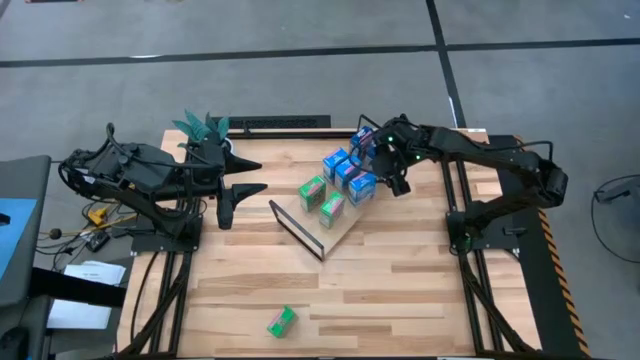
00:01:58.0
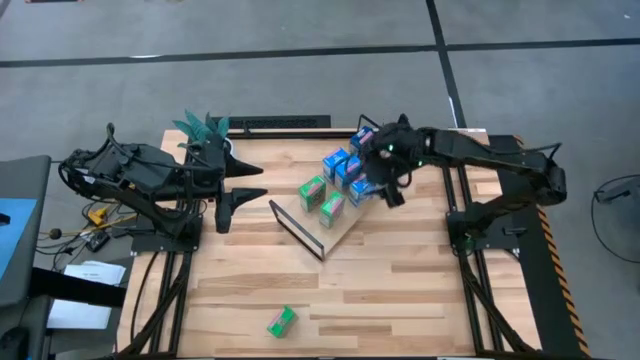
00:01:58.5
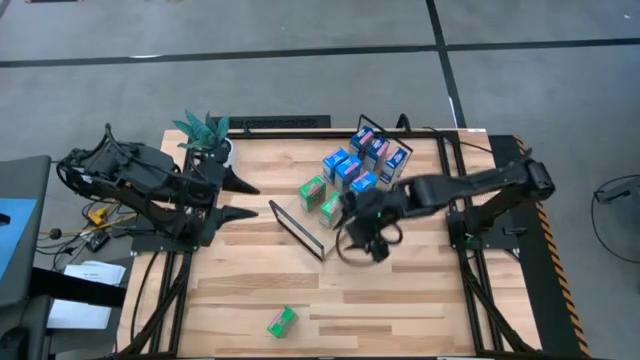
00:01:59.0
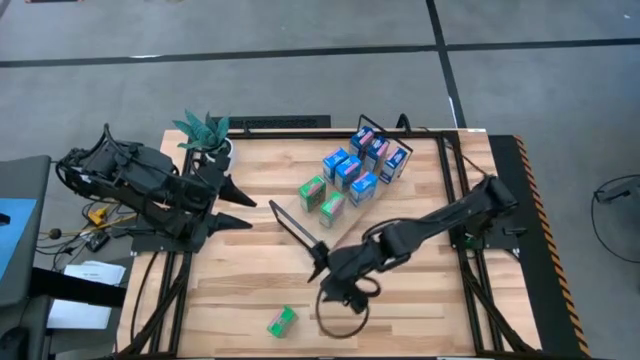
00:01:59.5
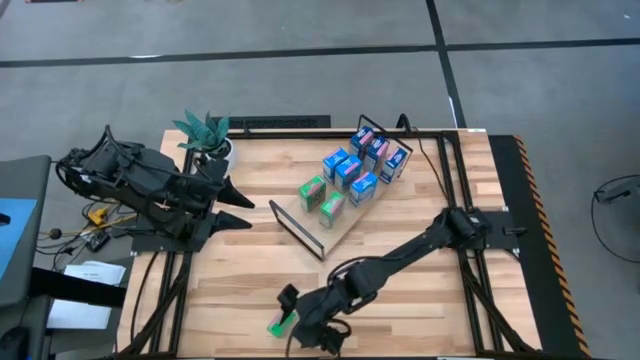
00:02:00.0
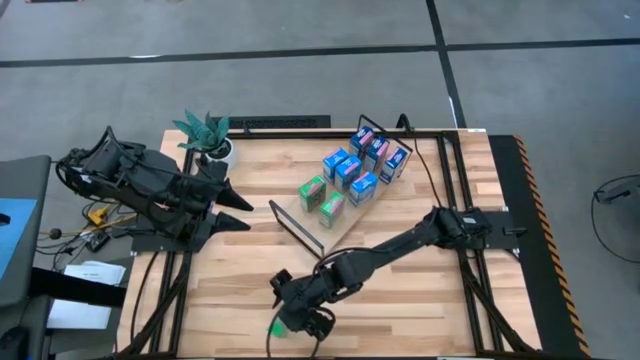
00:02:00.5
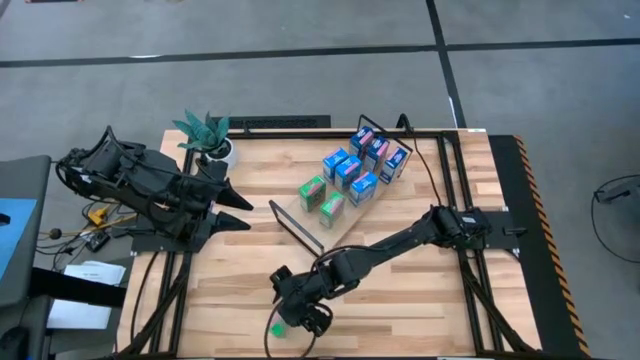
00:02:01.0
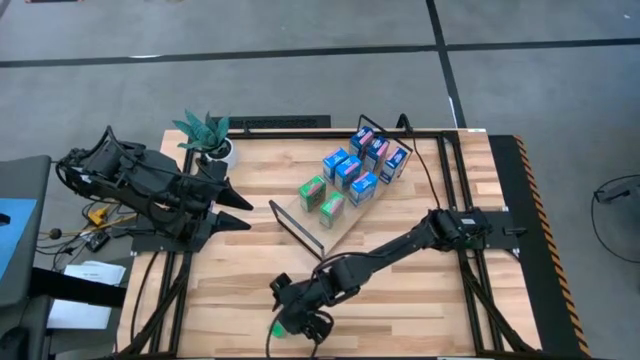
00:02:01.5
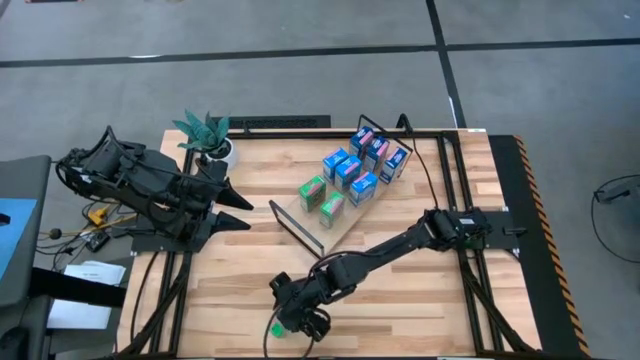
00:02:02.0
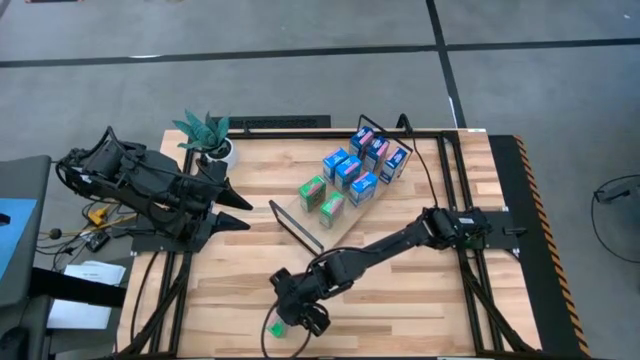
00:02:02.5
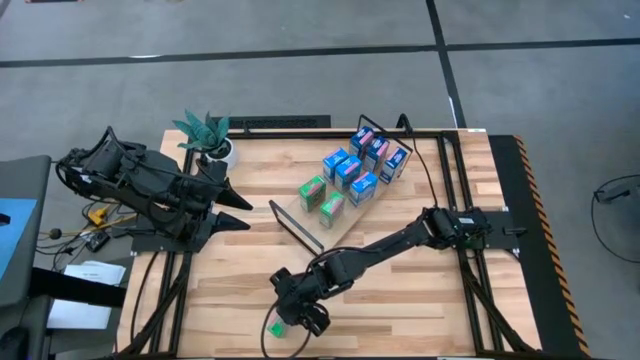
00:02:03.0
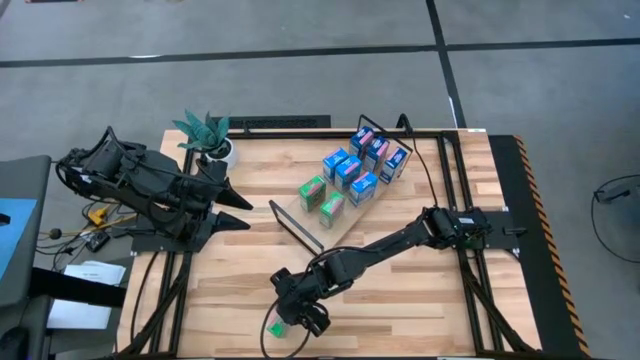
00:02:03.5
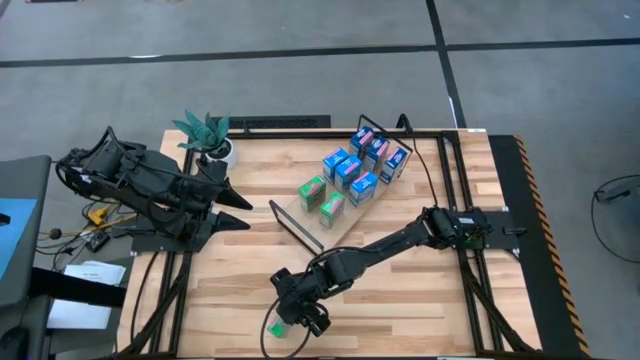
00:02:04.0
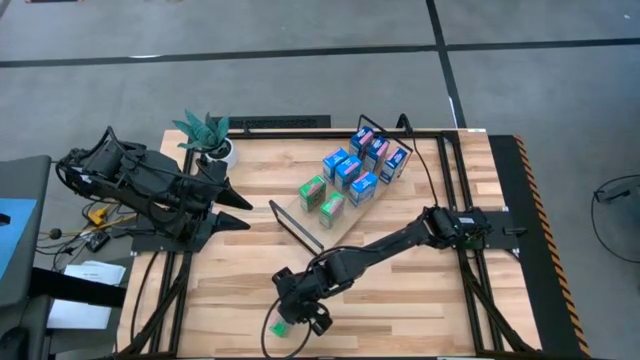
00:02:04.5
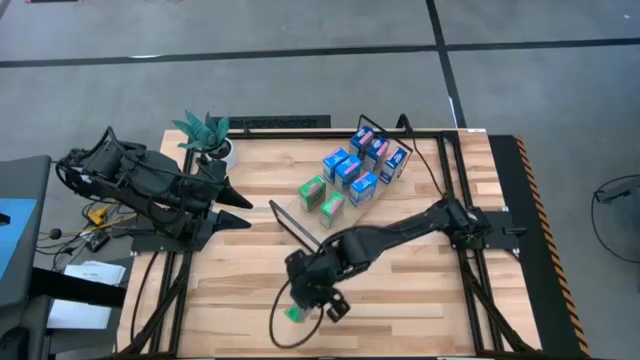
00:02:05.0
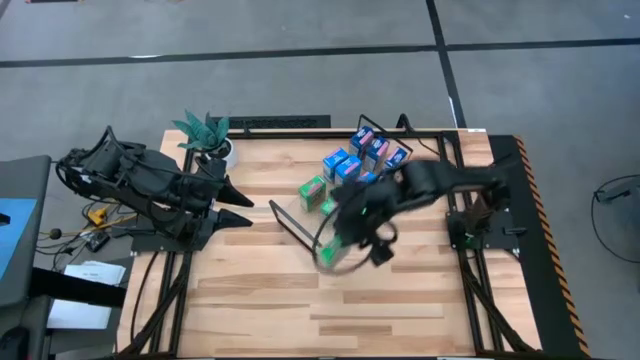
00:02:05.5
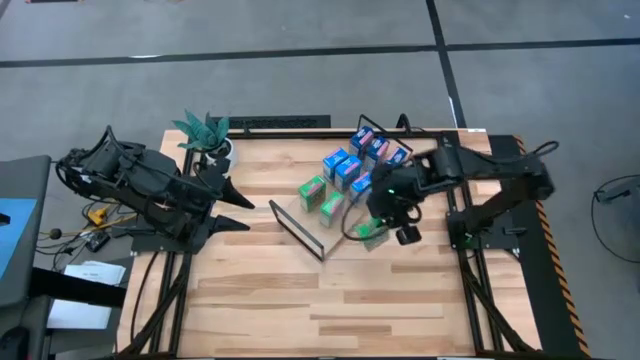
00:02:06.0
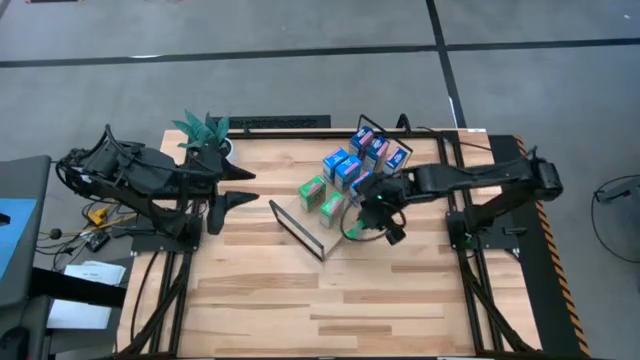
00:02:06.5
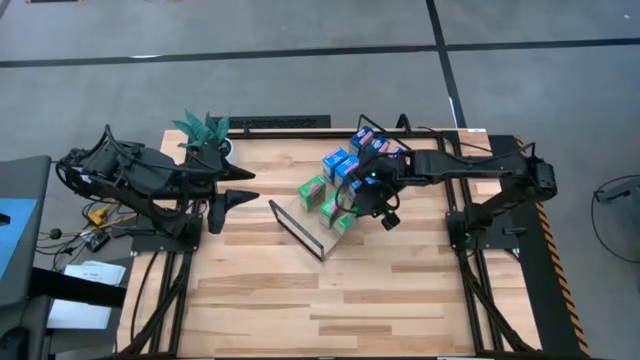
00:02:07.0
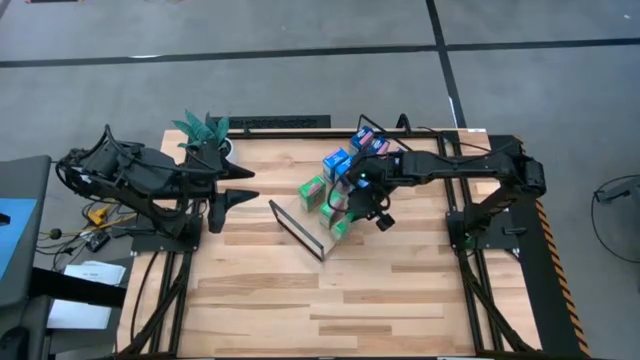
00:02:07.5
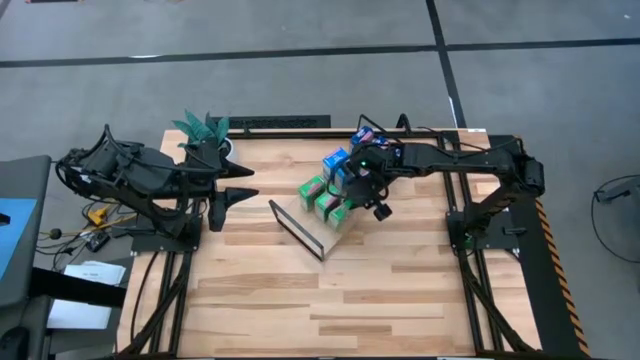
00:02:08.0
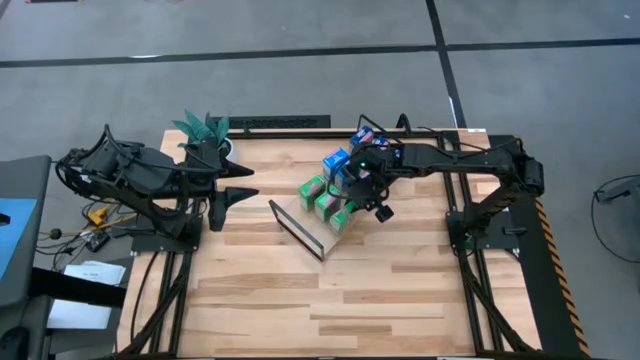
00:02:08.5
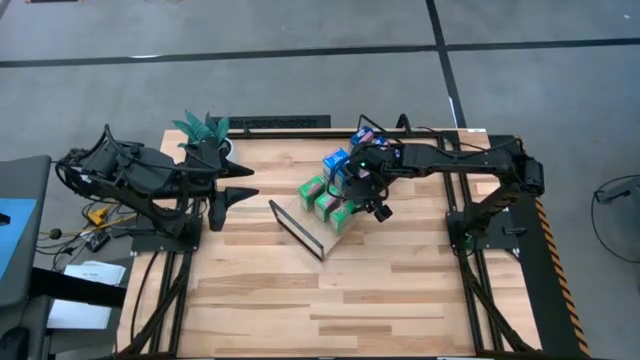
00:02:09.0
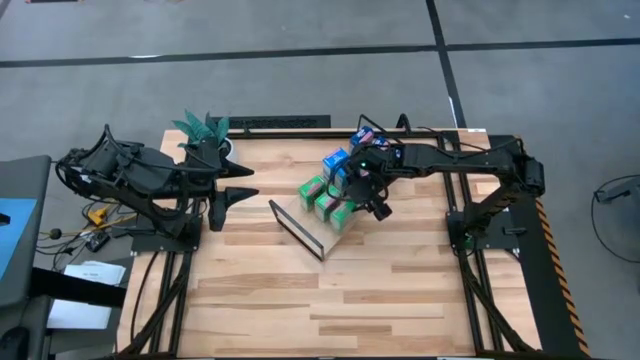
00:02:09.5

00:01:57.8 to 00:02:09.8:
Task: Stack cereal on shelf
Put the green cereal box on the shelf aligned with the green cereal boxes

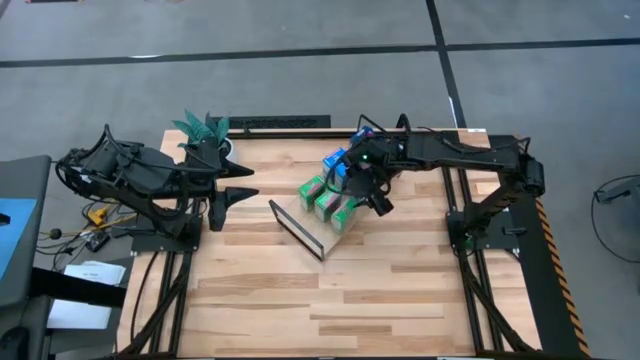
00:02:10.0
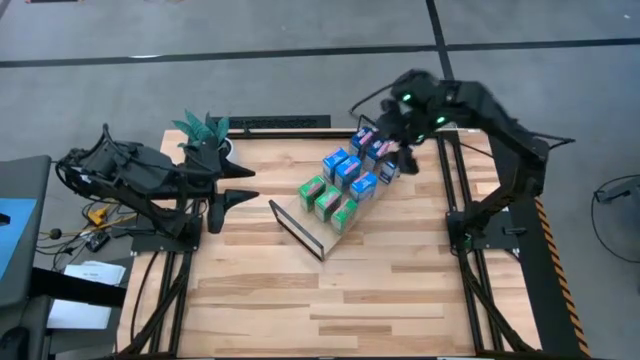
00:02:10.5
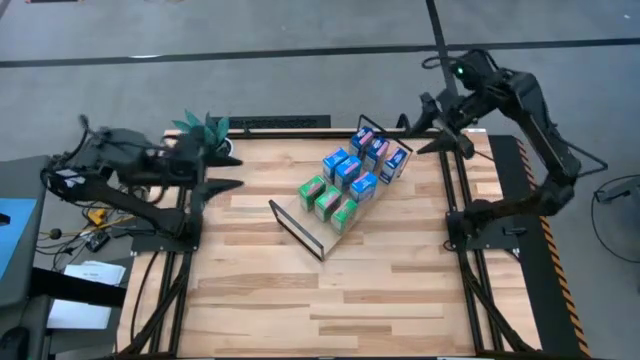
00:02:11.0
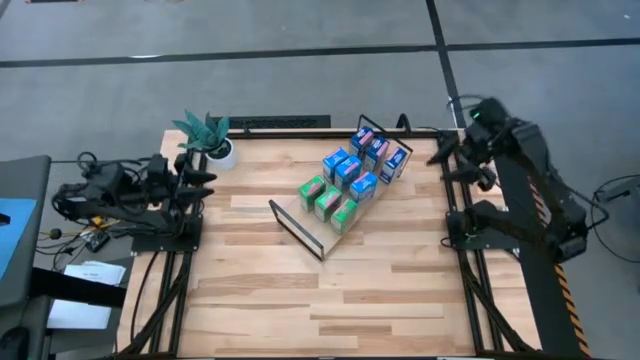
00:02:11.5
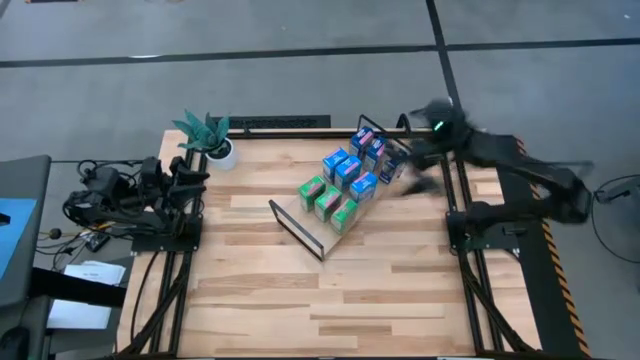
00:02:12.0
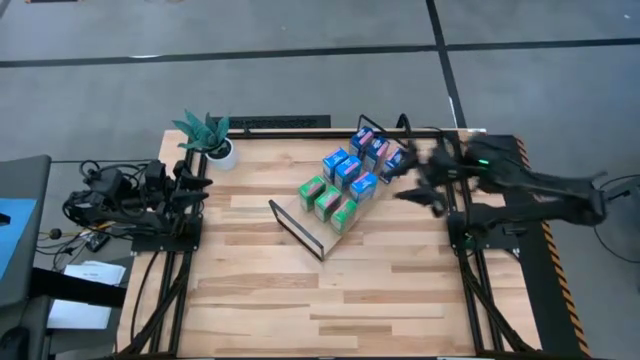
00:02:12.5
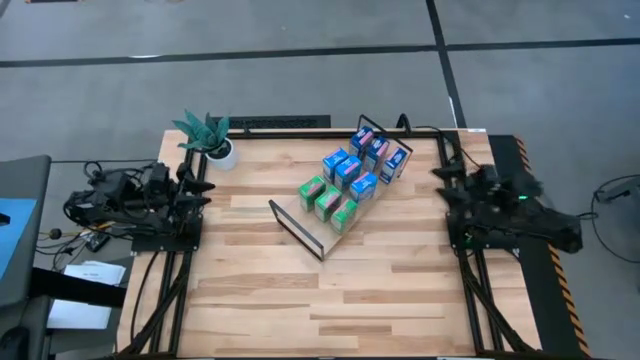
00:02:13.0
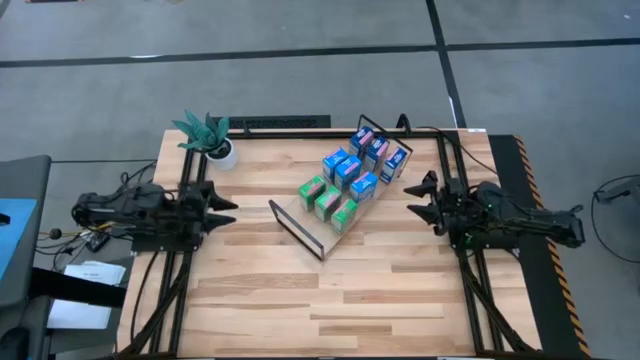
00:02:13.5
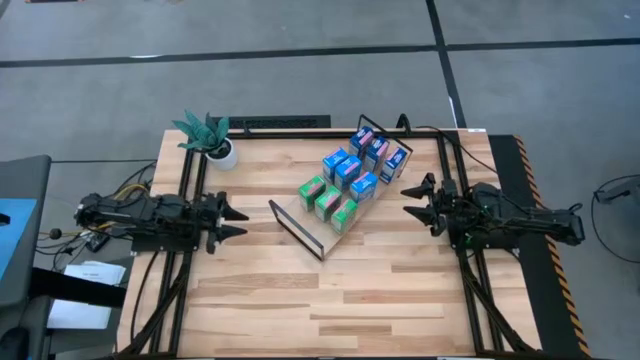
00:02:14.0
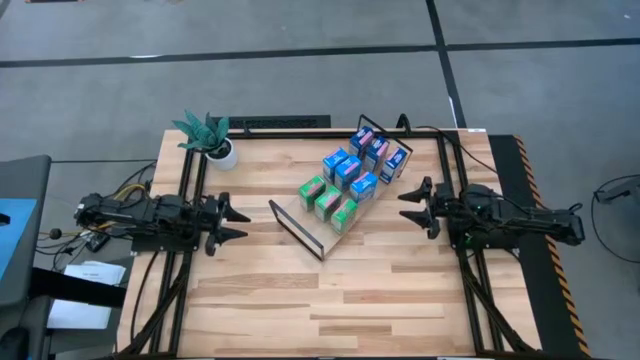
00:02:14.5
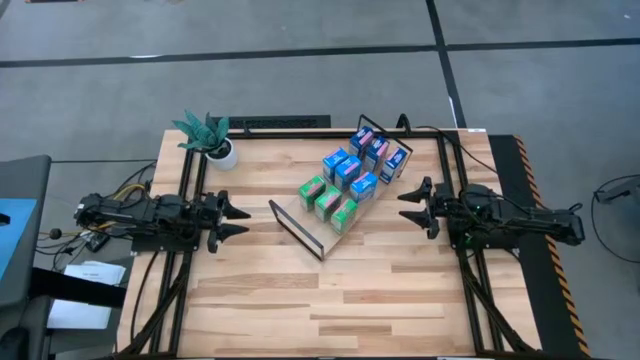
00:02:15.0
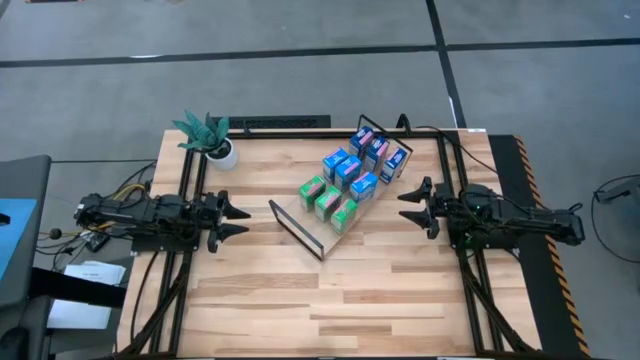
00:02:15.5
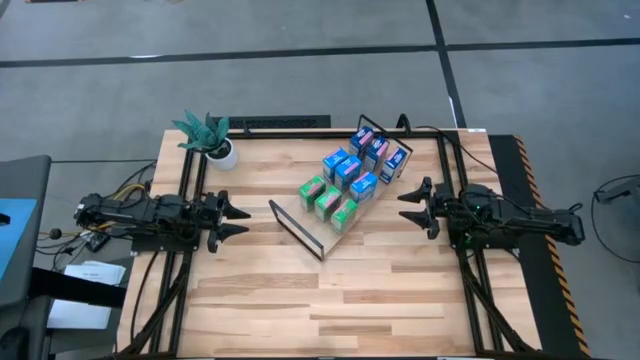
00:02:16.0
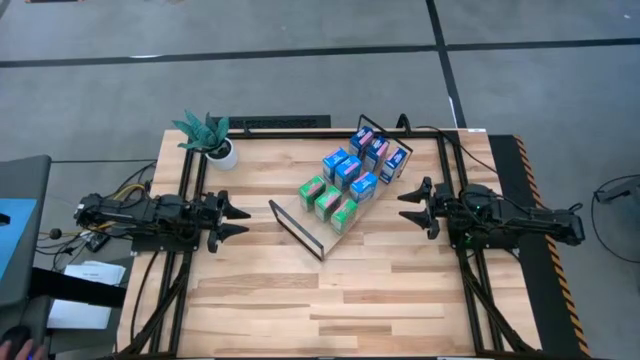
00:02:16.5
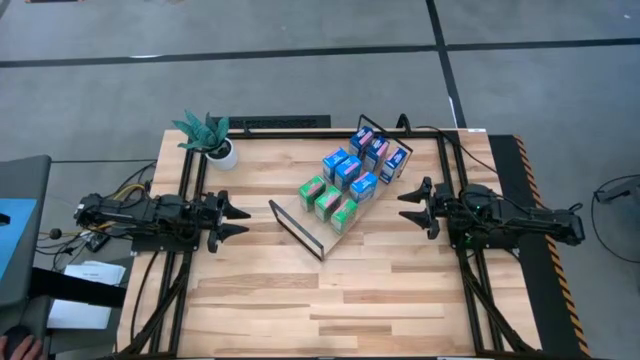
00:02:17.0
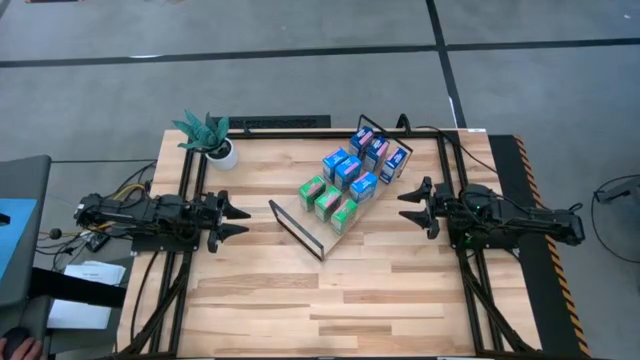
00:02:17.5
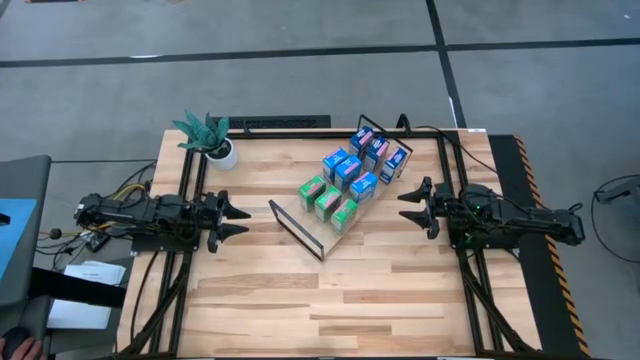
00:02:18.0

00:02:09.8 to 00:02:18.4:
Return to Home Position

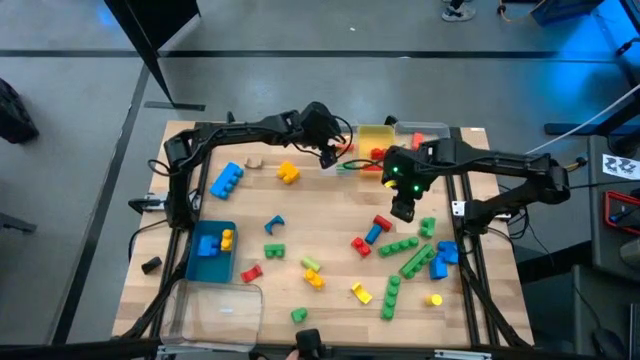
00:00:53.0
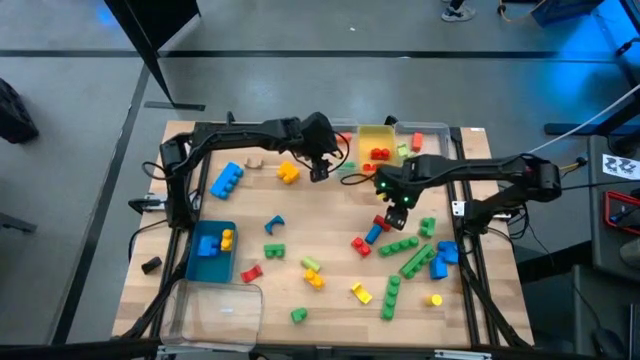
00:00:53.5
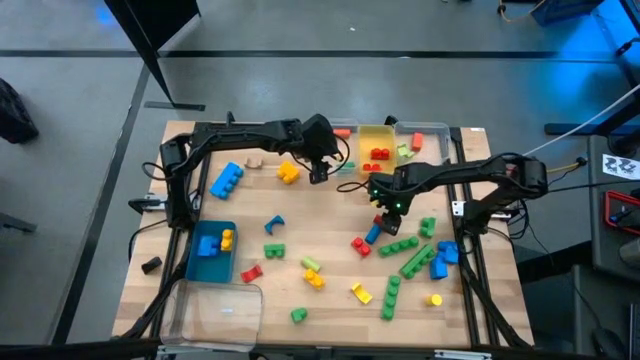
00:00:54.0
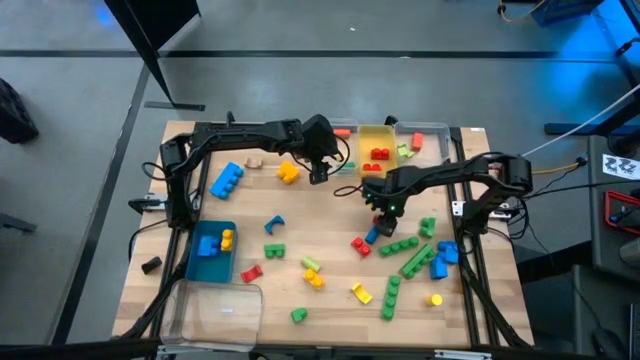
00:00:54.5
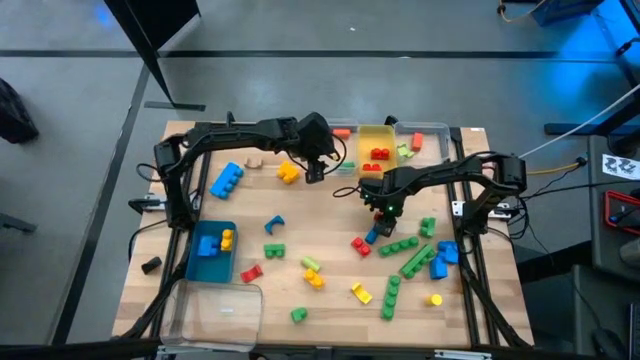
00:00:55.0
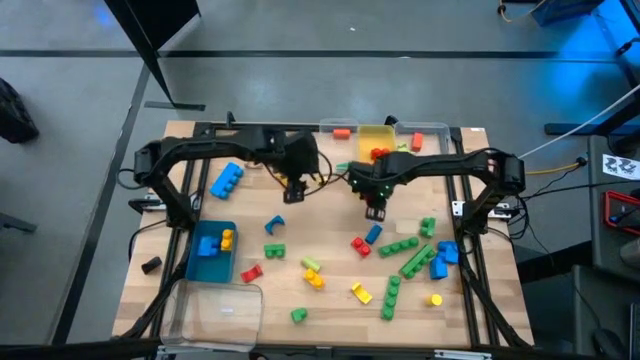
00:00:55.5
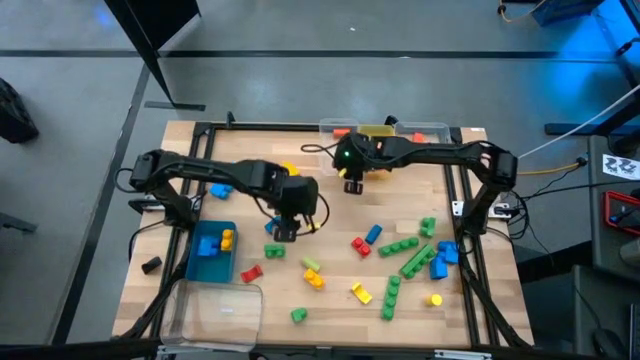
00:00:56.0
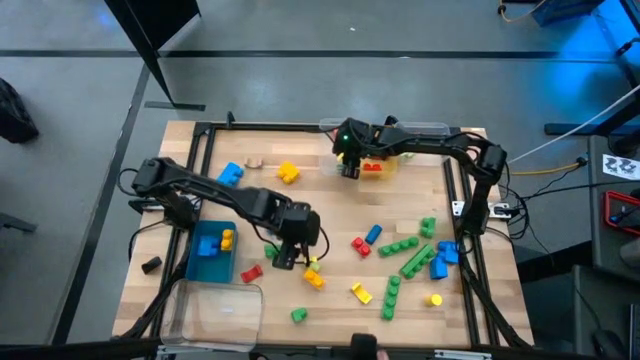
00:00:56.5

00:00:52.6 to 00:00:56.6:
Task: Sort blocks by size
Put the red cylindrical block into the top left transparent bin
